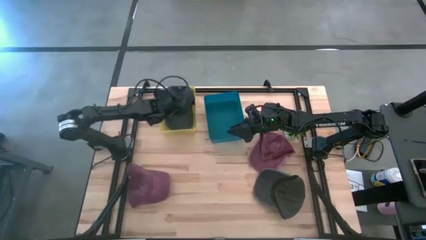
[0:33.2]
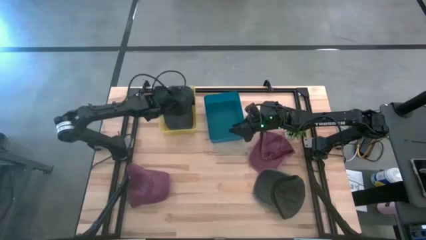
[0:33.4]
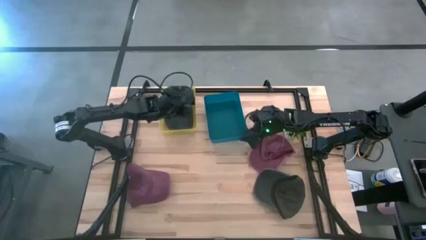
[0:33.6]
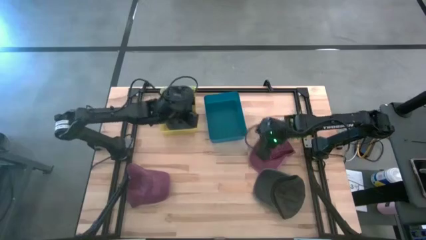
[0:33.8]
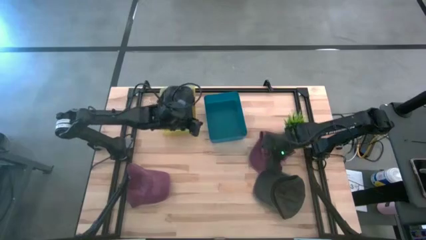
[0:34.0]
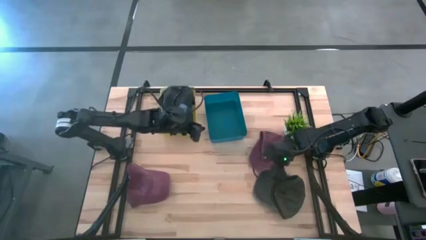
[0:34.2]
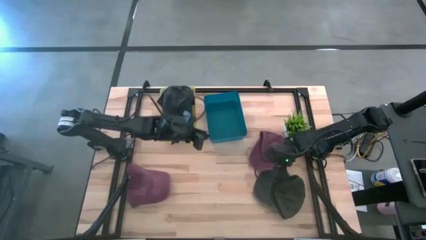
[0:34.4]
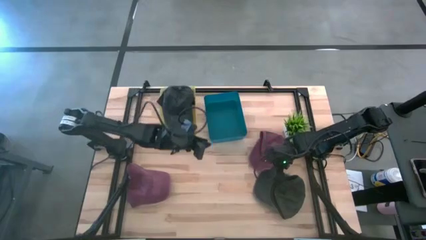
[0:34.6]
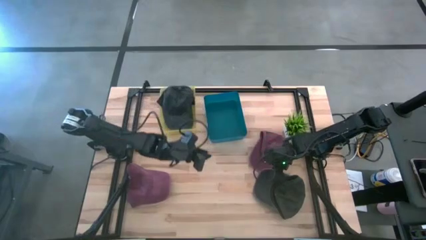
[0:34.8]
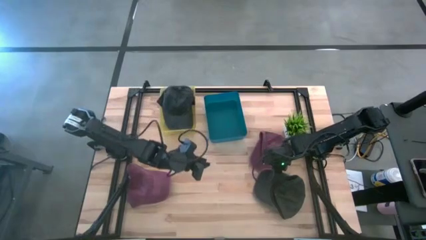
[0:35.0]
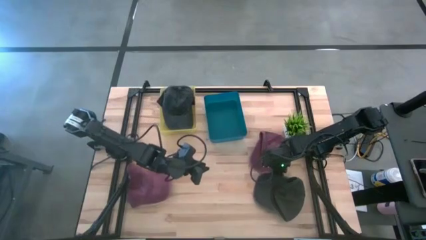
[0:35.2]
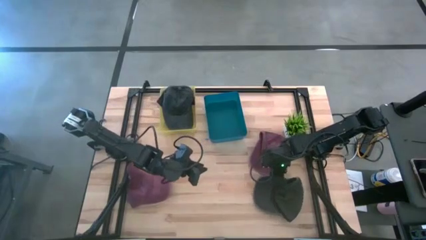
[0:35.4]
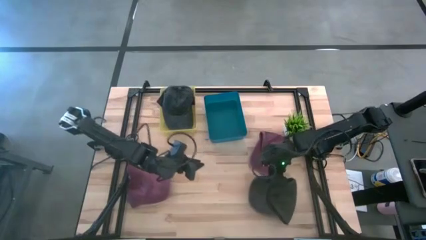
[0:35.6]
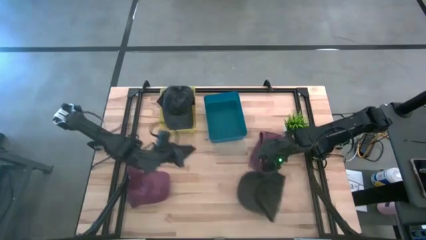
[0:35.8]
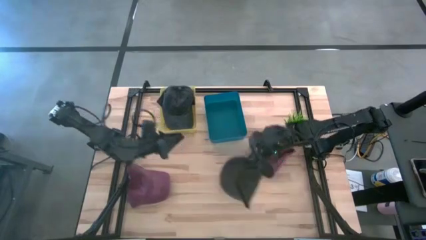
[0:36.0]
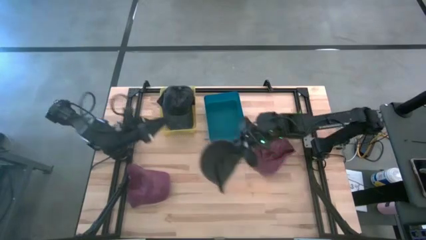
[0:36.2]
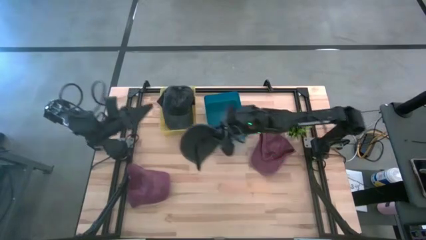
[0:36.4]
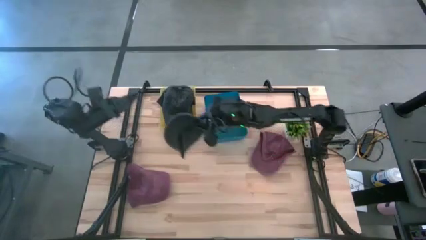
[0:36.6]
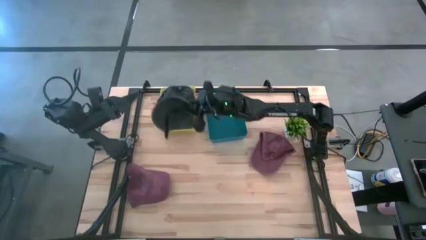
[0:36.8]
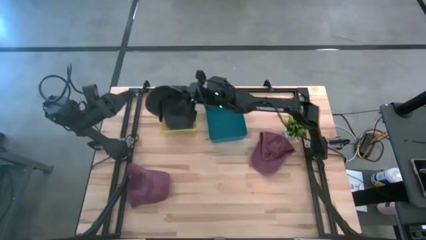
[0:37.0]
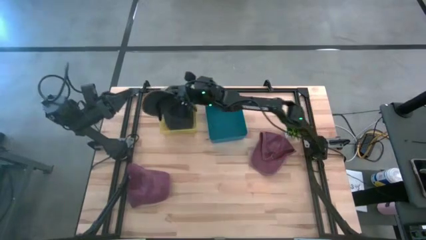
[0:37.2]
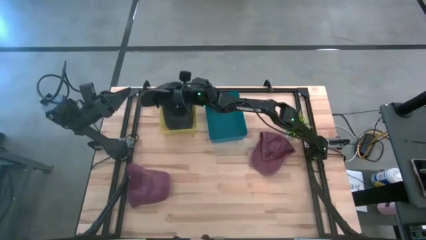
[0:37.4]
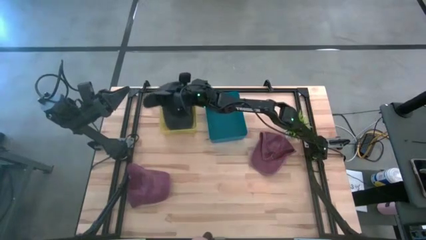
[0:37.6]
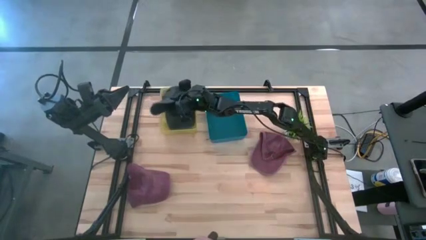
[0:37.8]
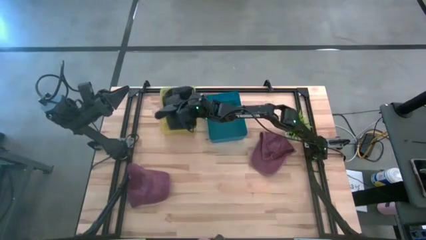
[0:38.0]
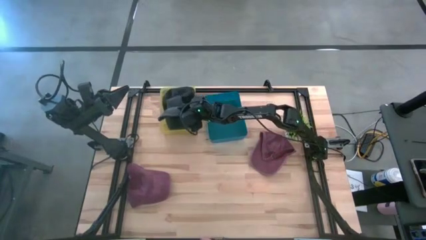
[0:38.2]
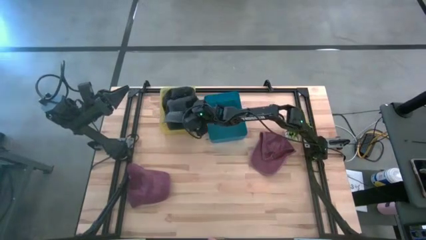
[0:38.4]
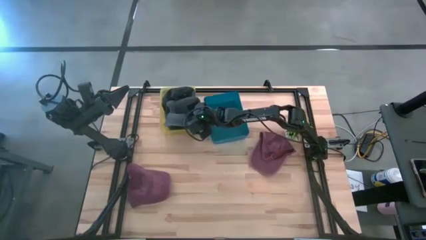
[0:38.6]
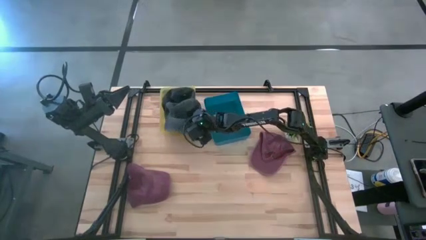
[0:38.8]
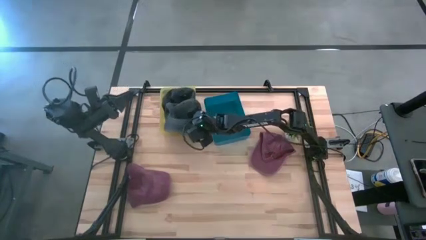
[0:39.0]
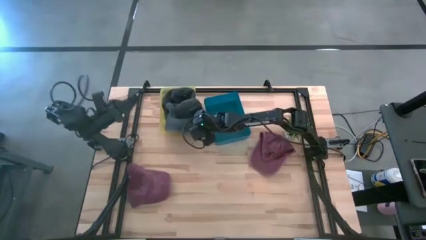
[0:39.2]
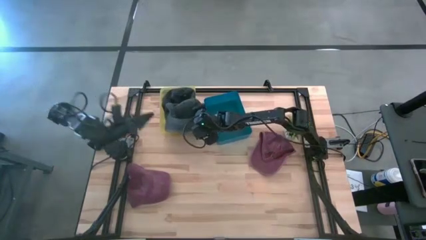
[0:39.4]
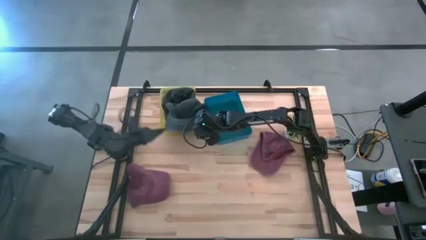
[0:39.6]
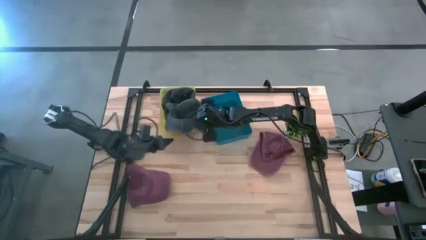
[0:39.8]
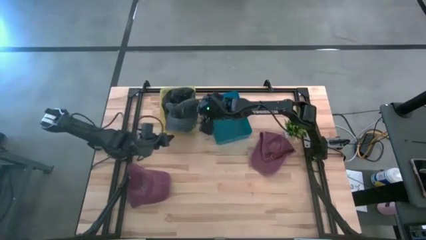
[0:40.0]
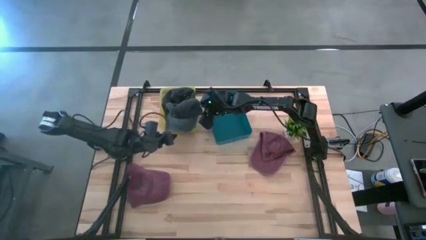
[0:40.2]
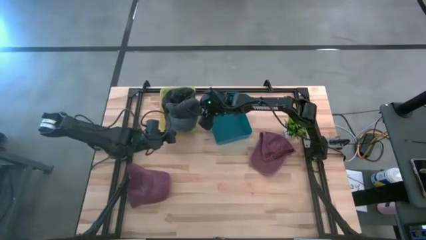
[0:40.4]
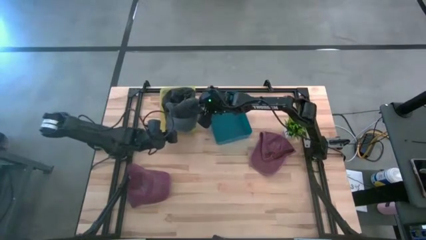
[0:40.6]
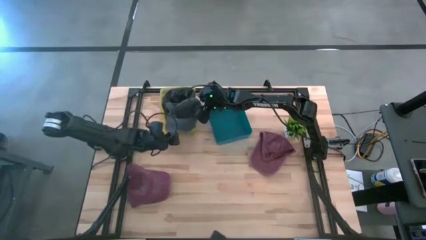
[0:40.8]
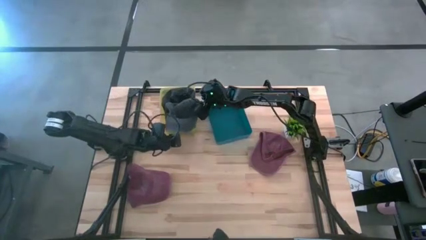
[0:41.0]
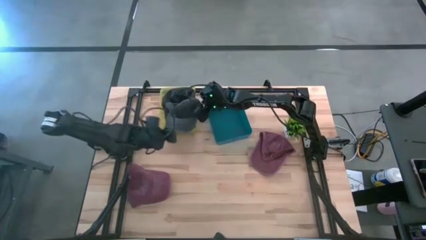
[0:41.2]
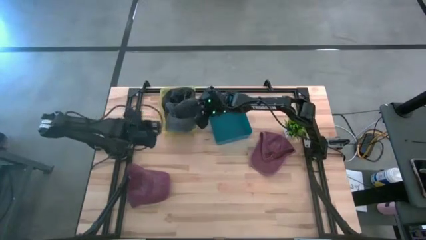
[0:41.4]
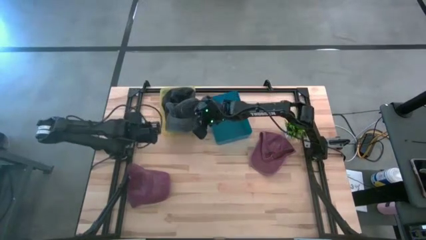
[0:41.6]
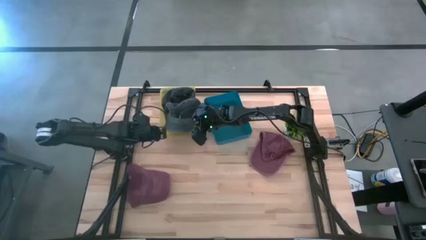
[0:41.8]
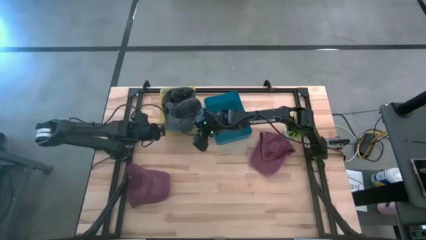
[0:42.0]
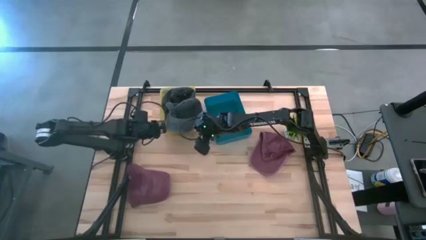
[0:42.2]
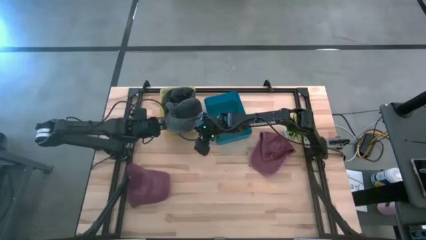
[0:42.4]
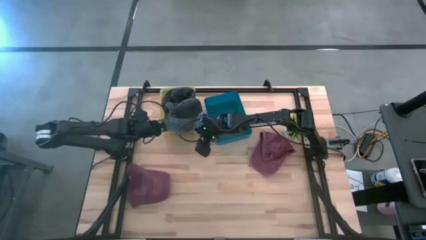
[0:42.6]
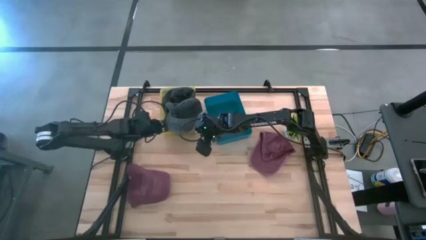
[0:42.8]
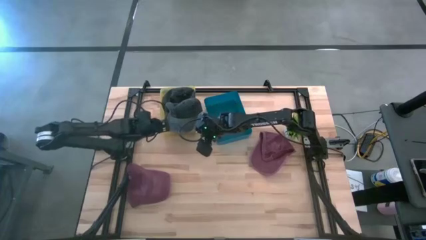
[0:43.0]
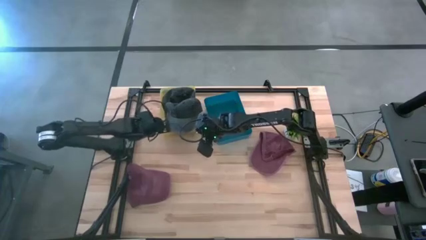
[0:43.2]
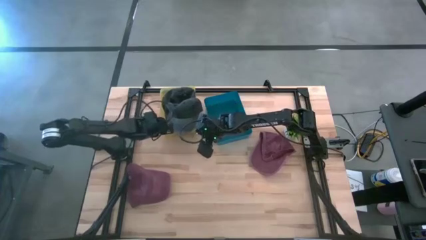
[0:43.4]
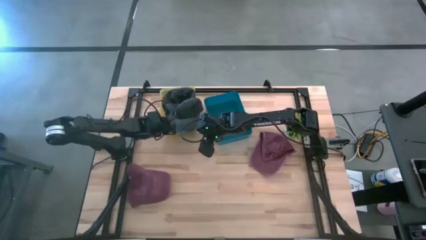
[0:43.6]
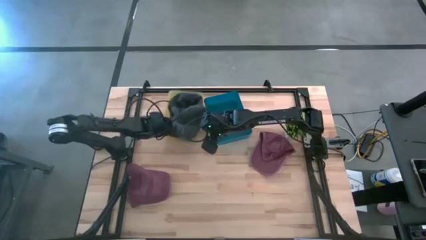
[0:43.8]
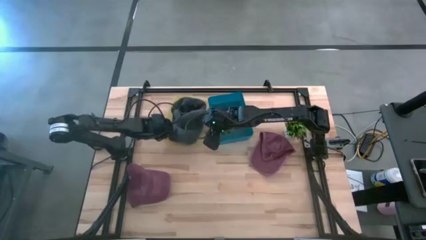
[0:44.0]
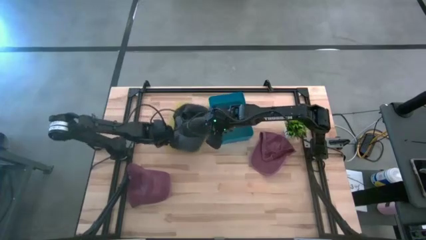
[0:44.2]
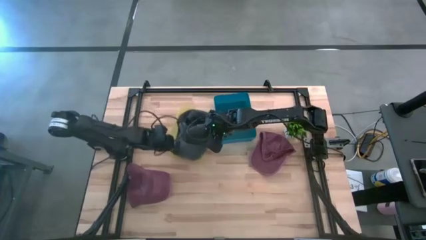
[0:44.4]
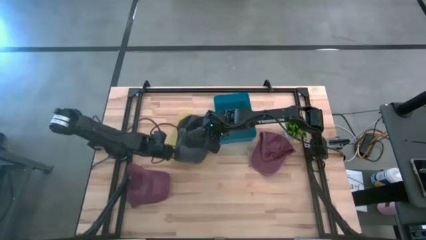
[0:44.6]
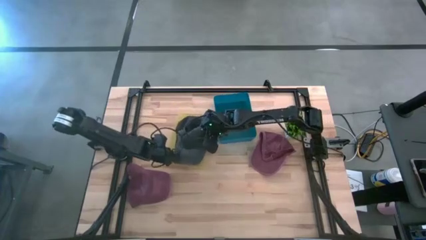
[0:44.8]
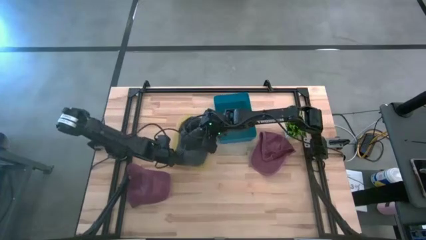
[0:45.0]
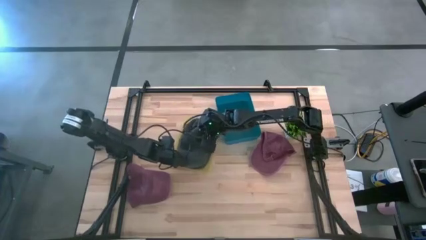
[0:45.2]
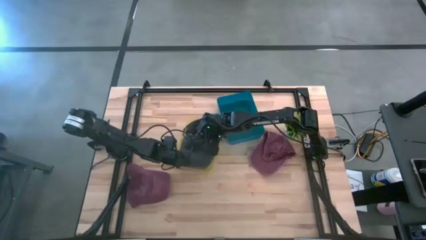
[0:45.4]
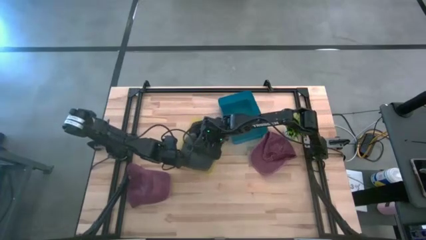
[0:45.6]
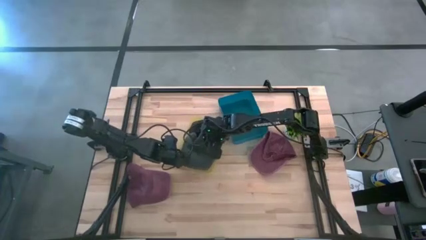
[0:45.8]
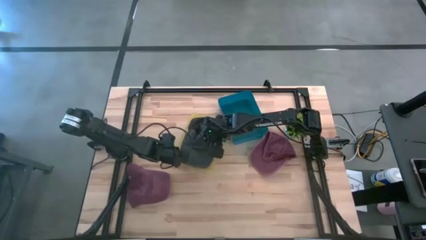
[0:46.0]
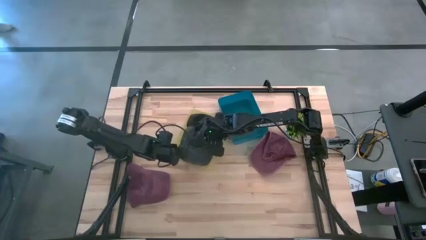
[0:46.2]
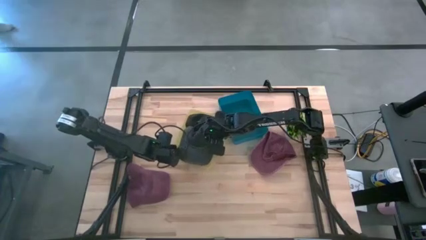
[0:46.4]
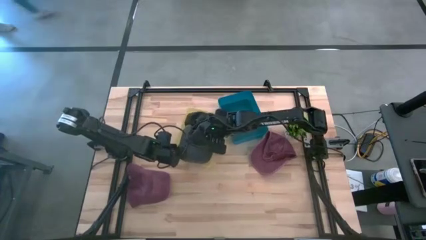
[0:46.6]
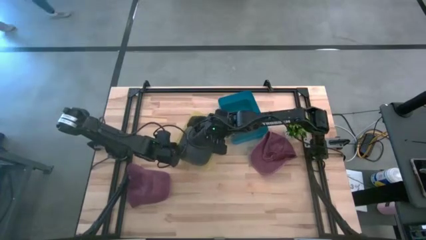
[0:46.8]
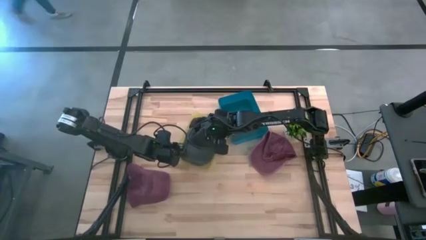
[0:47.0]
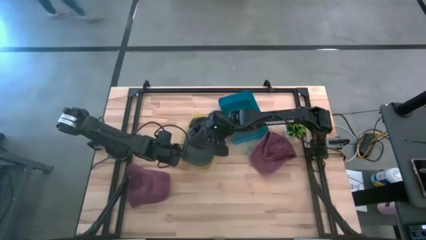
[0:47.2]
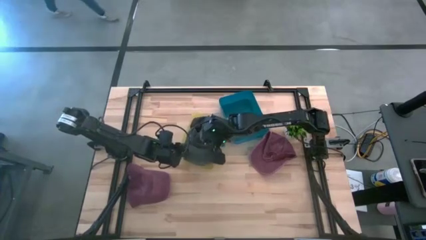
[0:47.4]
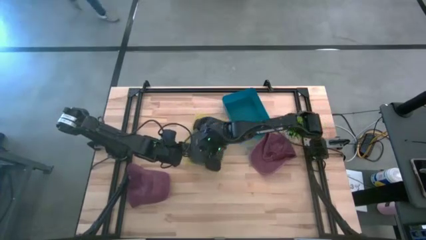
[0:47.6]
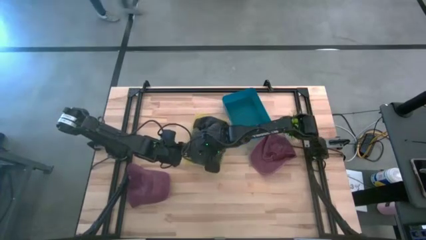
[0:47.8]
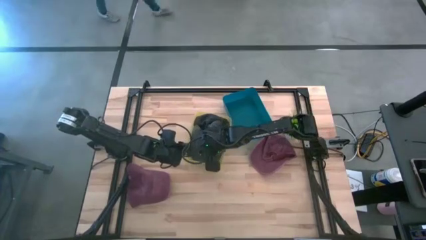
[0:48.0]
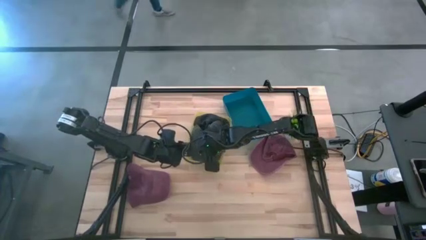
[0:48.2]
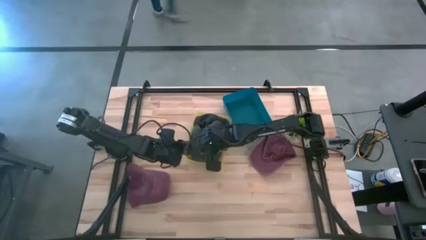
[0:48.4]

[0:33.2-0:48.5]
Task: Pick & Place hat
Put the black cap black into the yellow bin

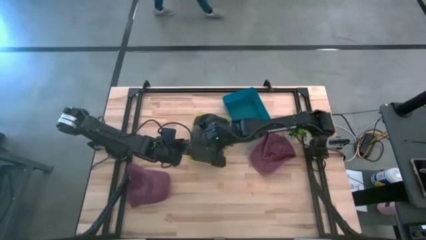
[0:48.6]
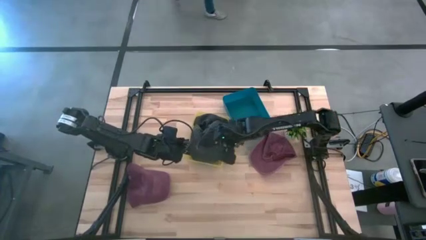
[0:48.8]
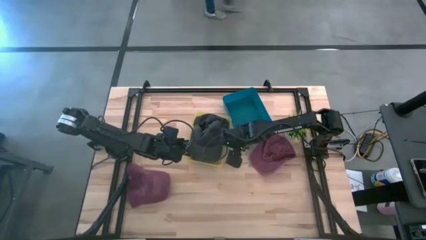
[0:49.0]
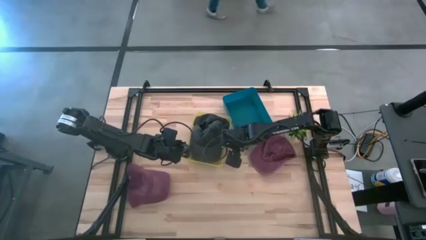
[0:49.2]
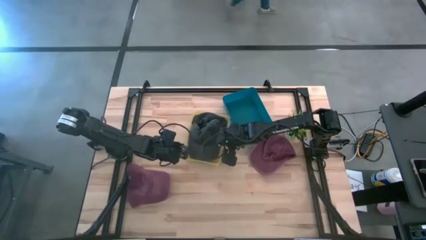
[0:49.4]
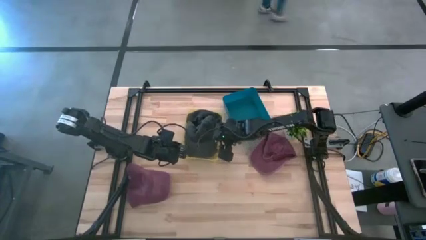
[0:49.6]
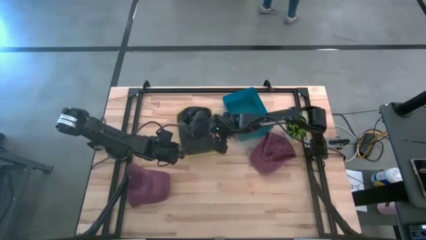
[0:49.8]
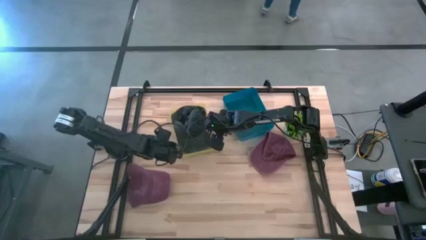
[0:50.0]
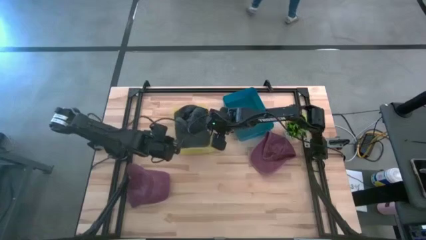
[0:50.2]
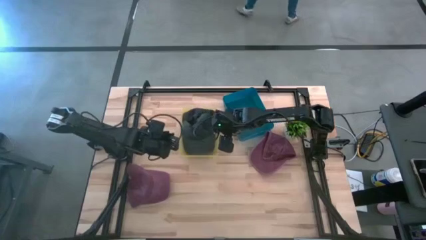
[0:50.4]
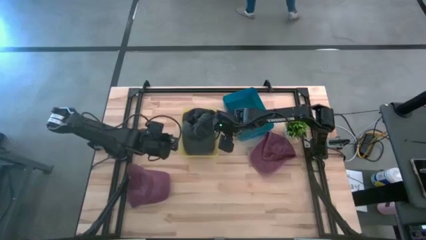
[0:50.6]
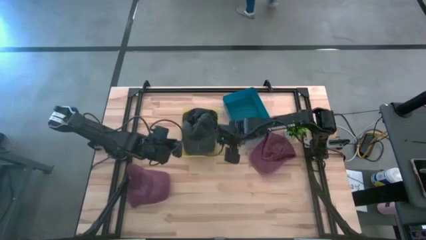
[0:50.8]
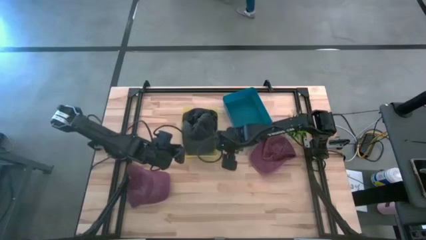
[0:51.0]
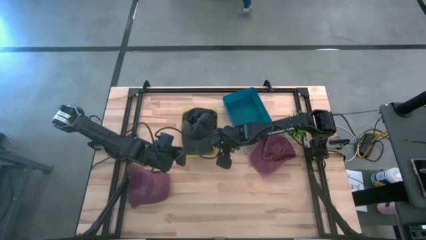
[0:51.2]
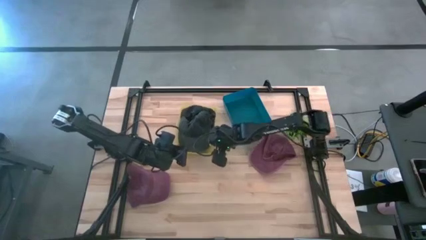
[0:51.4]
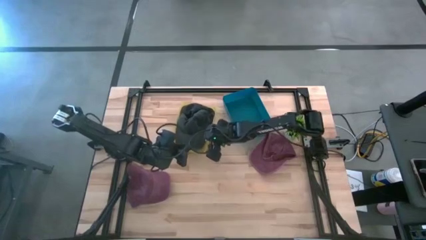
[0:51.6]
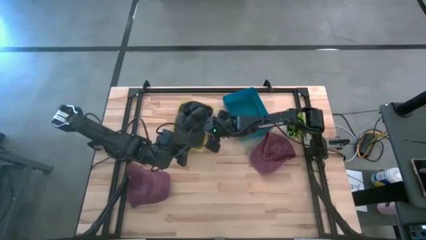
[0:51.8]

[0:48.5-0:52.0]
Adjust the yellow bin
